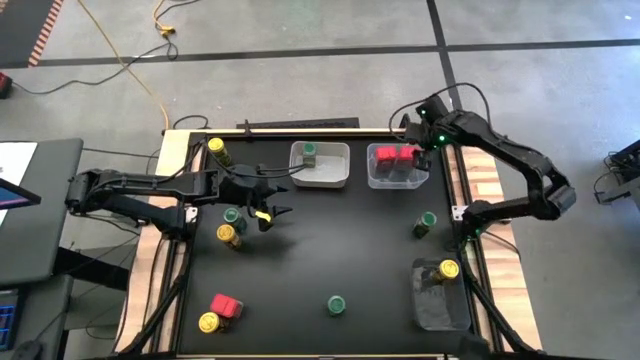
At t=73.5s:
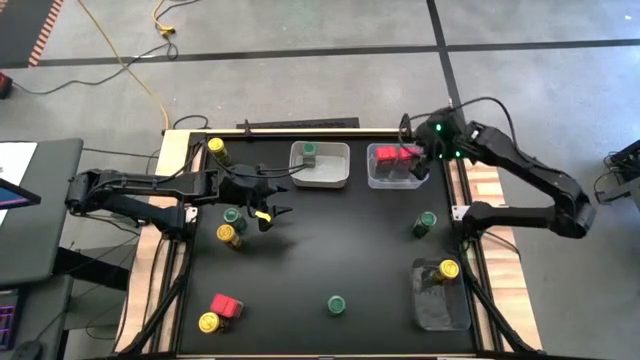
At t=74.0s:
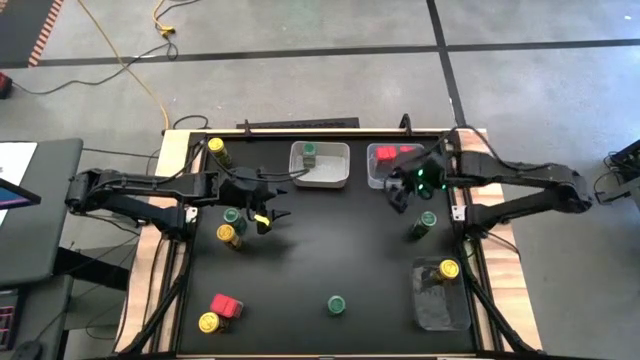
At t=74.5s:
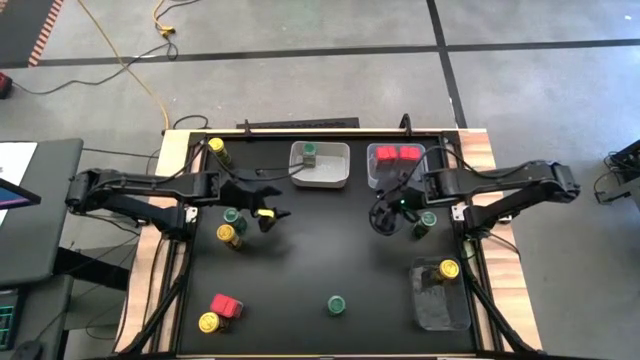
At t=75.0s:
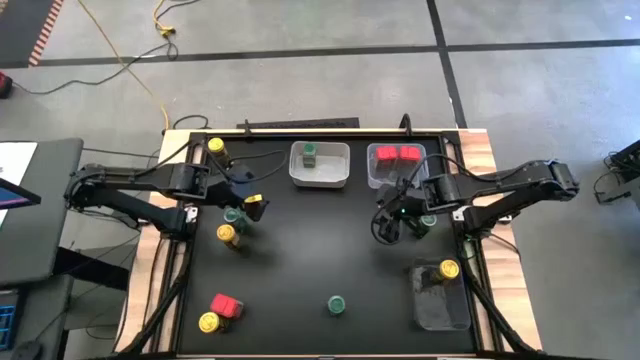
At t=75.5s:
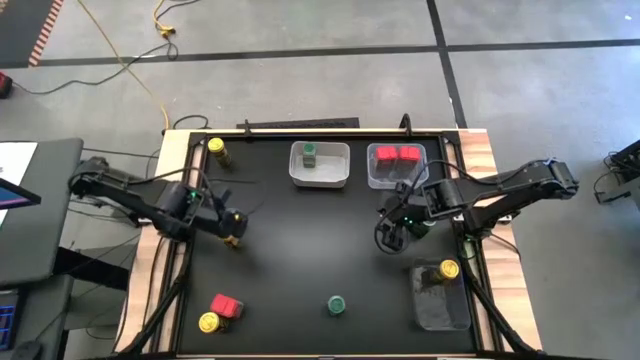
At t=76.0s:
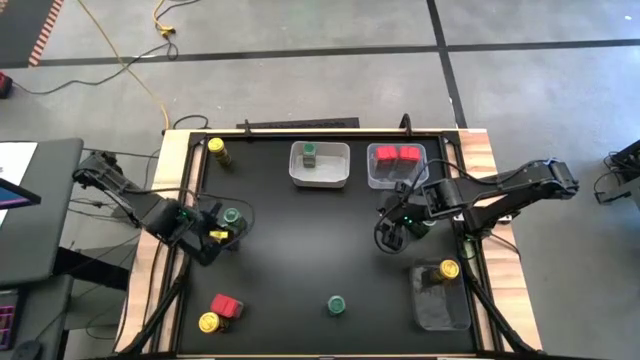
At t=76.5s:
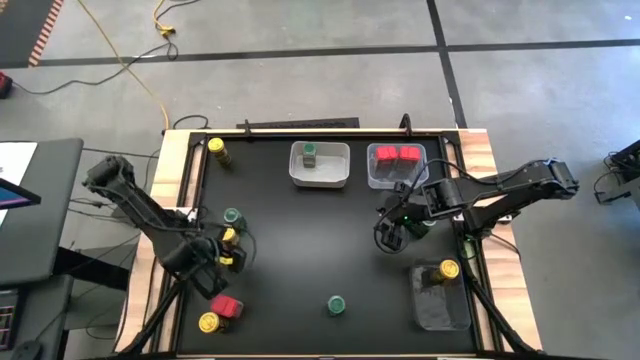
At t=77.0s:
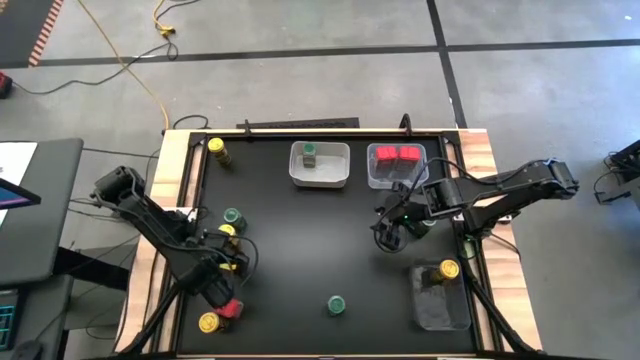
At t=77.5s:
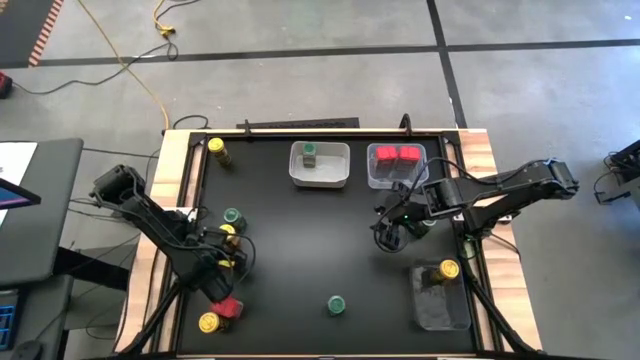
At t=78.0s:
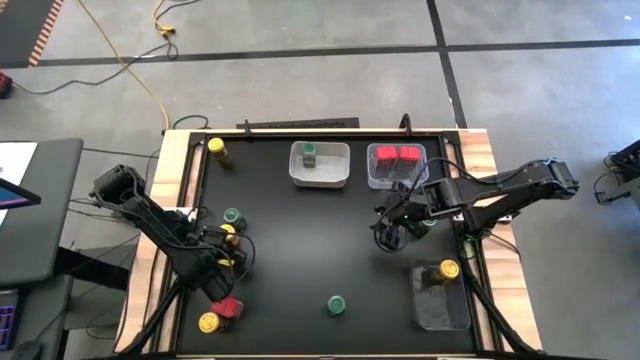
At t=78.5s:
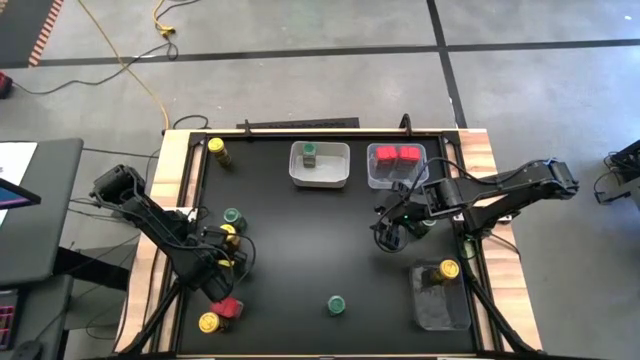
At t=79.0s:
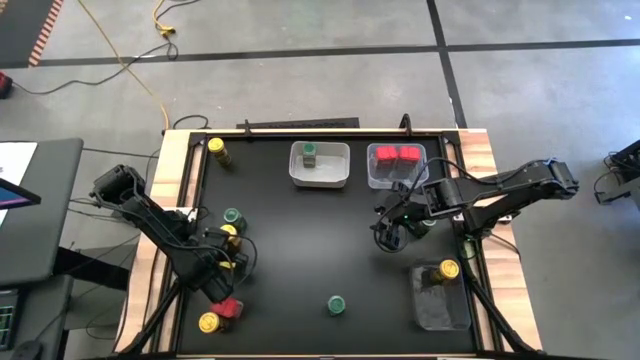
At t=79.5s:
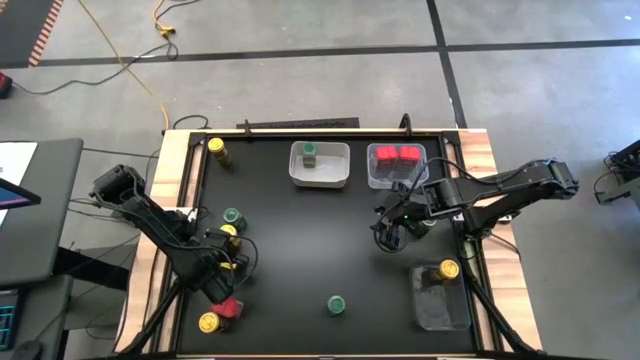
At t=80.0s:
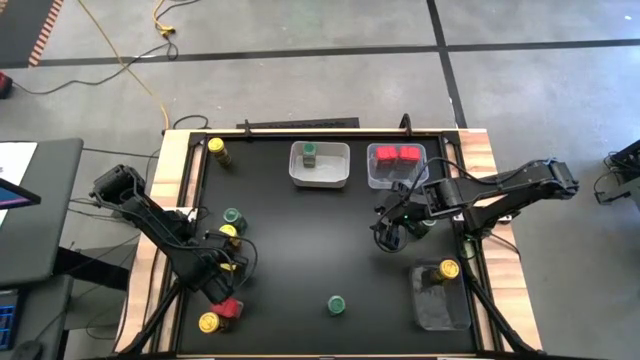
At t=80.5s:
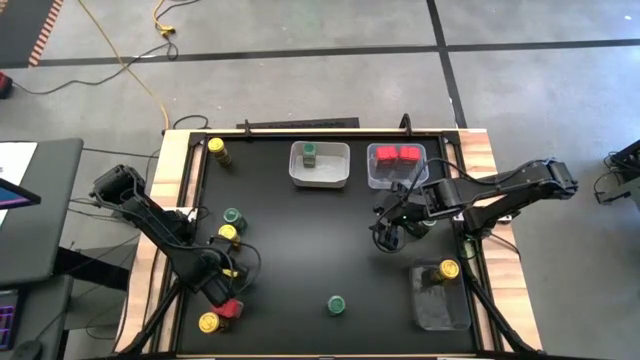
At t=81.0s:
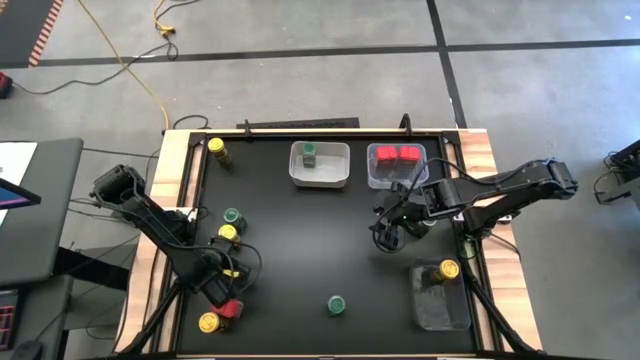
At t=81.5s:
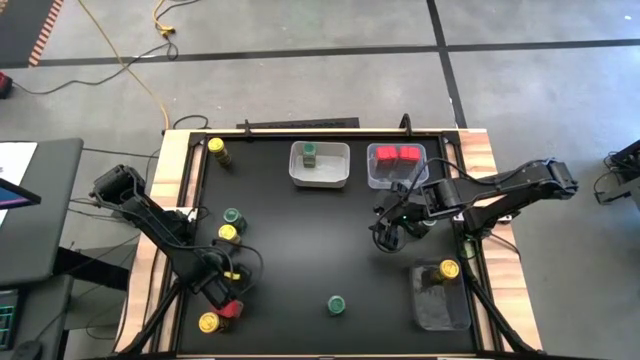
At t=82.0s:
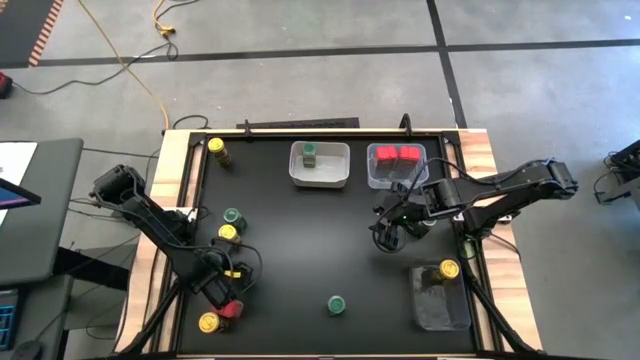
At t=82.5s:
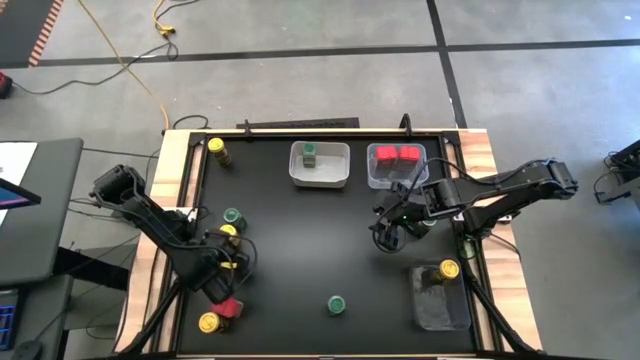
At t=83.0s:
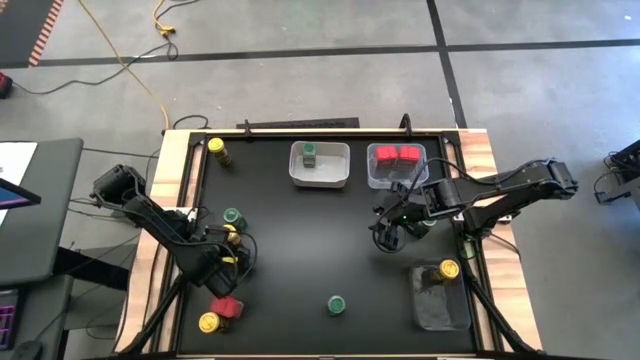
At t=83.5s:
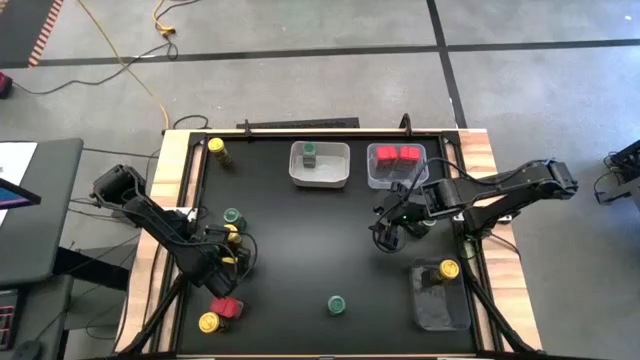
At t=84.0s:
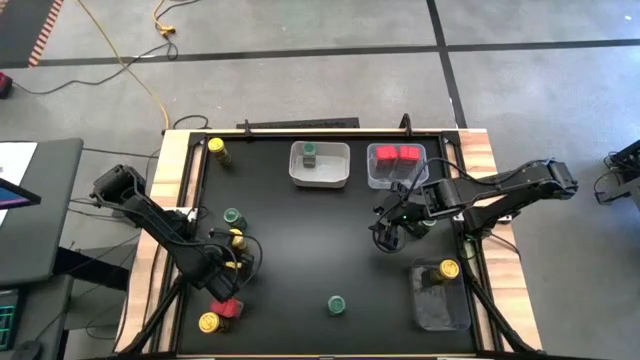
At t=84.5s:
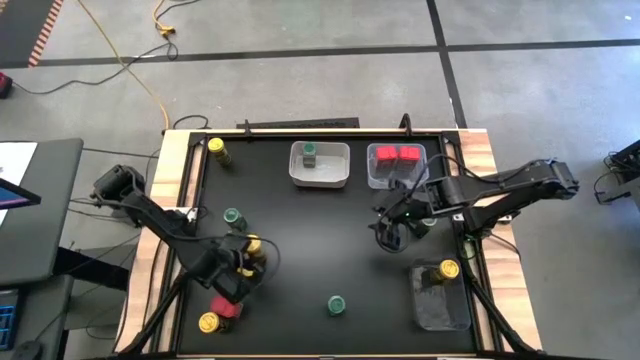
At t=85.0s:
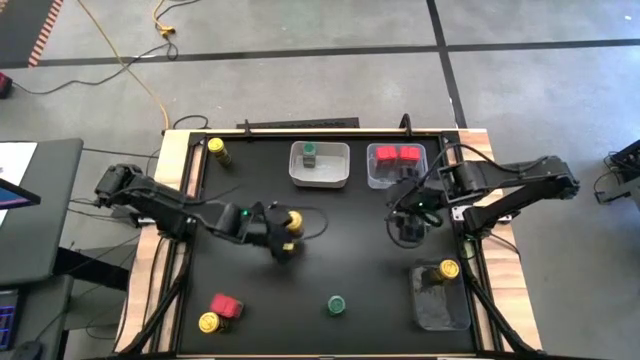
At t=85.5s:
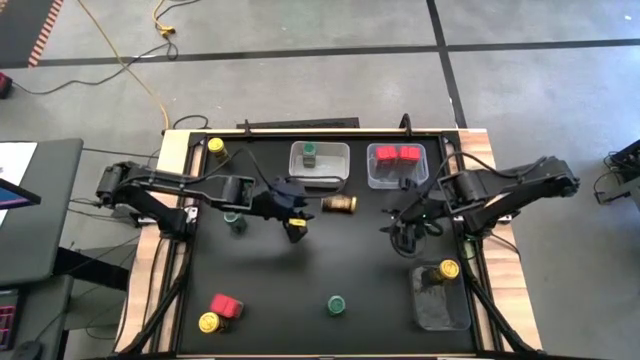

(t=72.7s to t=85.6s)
Task: Sort spices by type
Put the middle yellow seasoning can into the black bin

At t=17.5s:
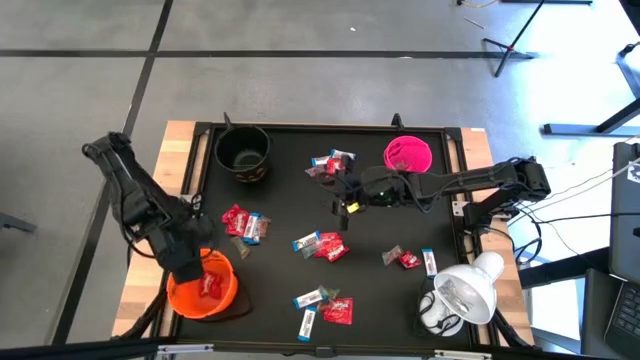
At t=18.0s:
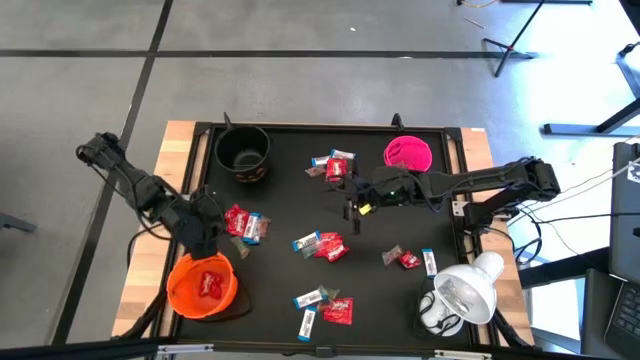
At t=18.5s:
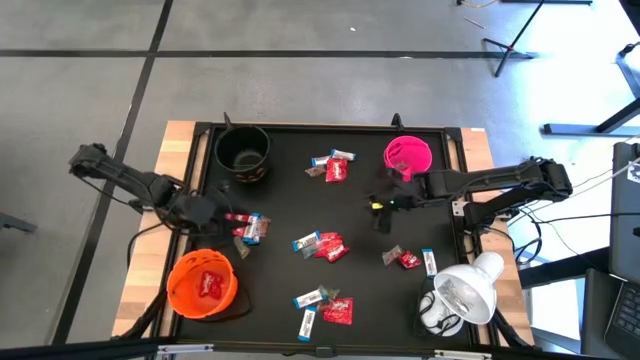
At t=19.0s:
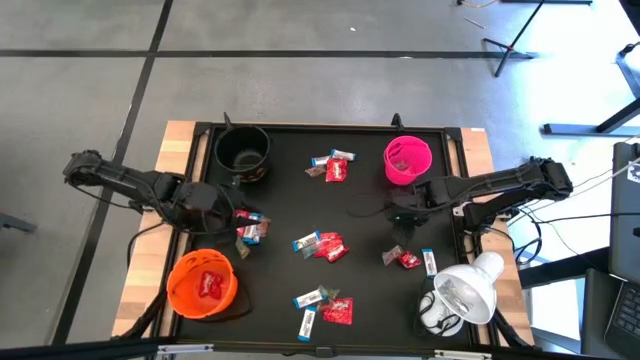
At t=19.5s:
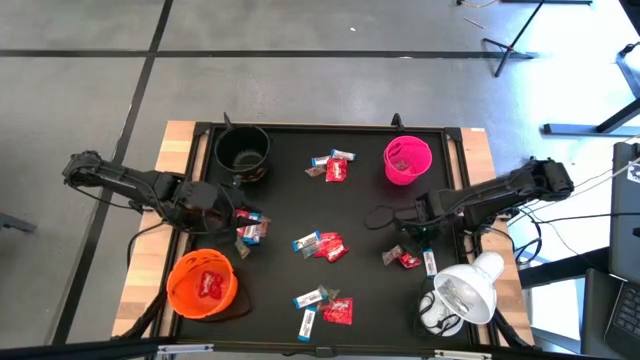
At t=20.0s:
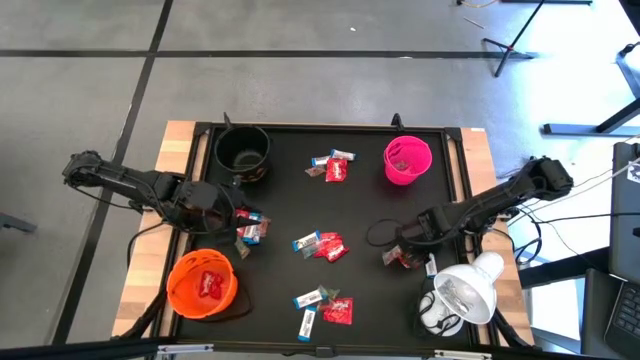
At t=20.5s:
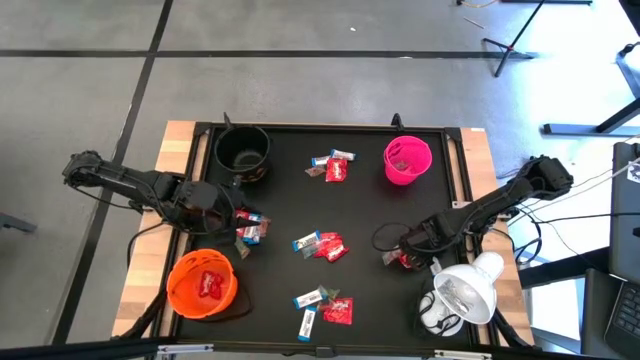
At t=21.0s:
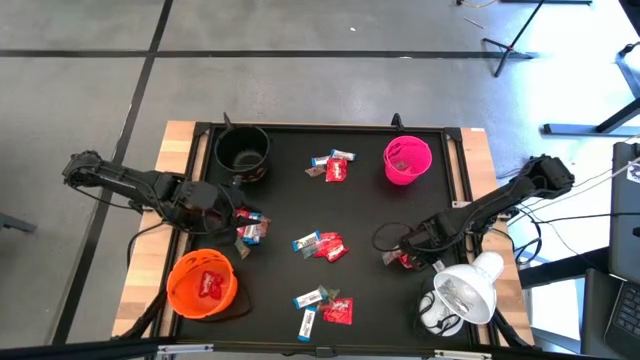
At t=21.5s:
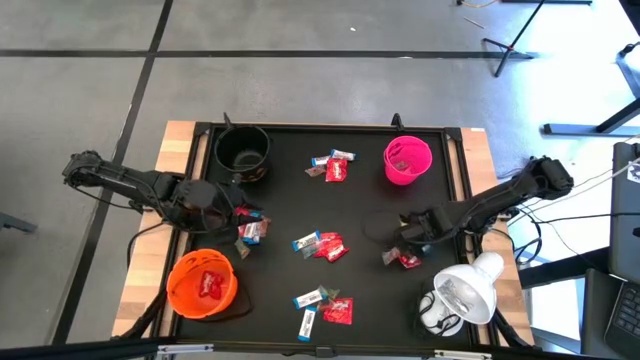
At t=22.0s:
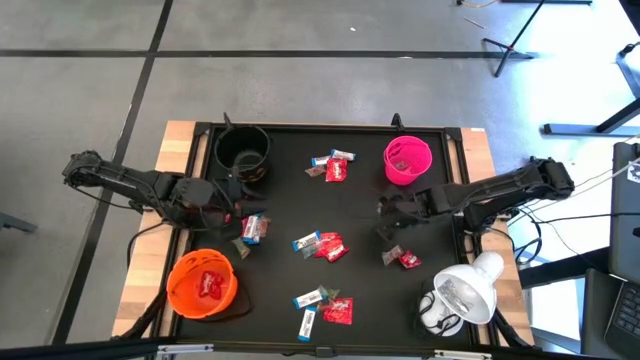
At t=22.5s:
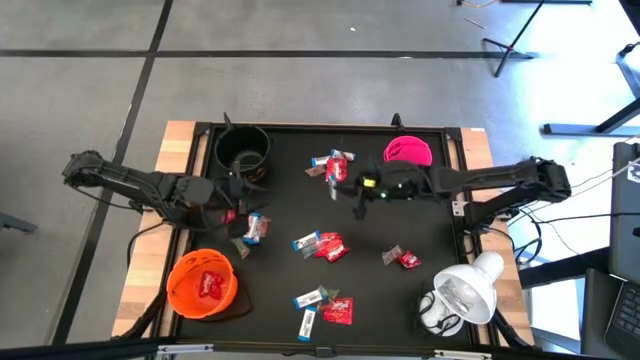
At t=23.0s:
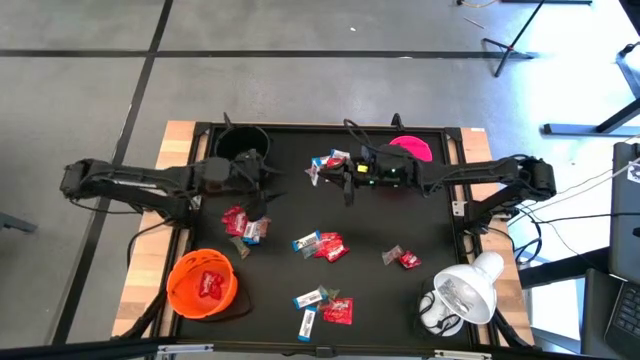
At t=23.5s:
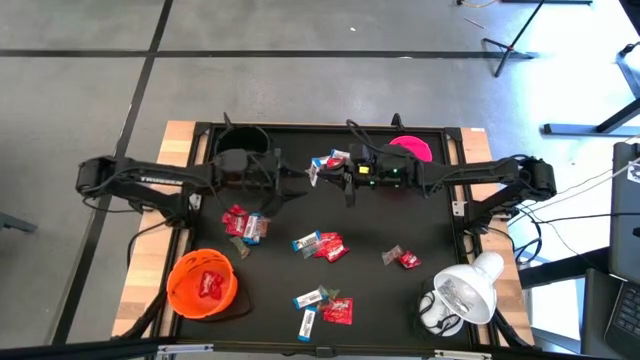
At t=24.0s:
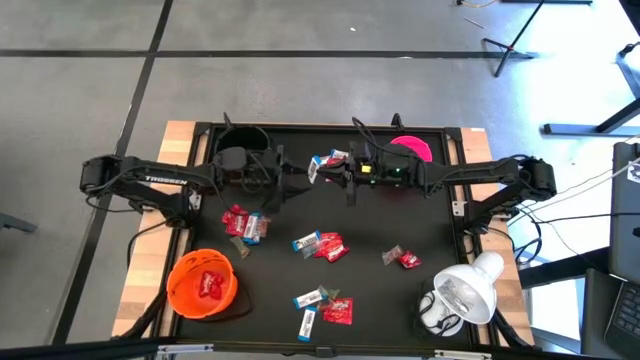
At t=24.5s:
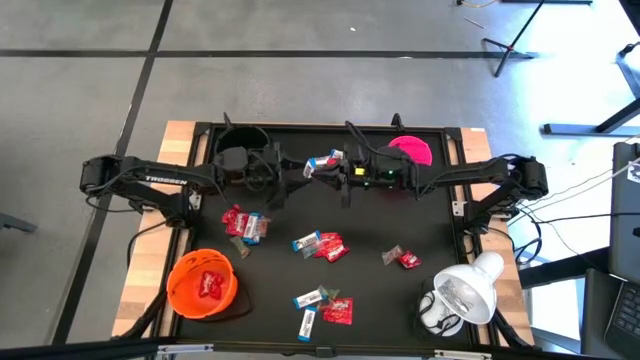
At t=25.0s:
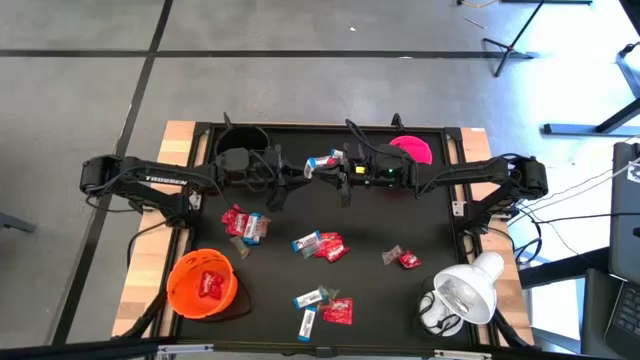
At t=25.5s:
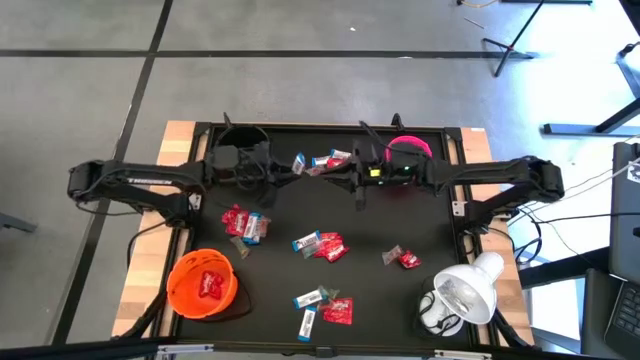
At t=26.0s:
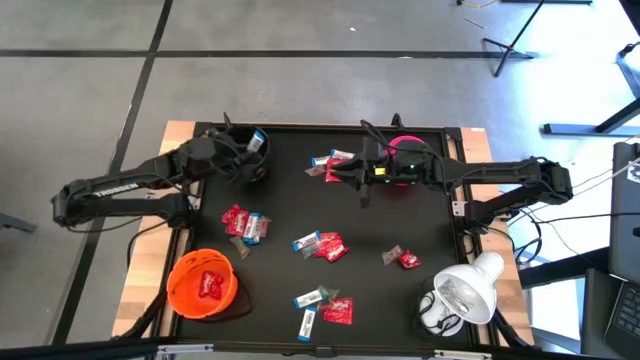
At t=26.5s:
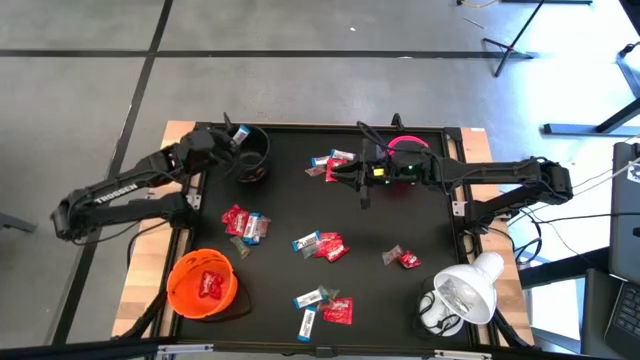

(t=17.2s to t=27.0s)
Task: Sort candy
Put the white chocolate bar into the black bucket
